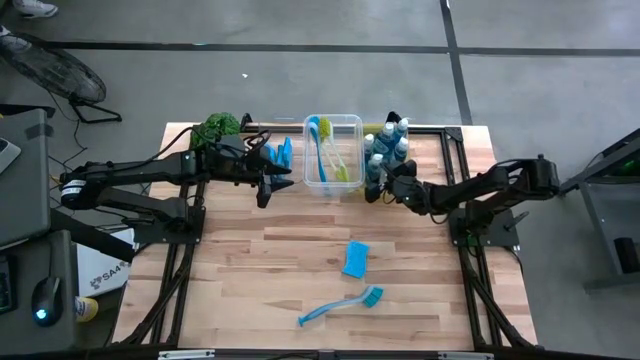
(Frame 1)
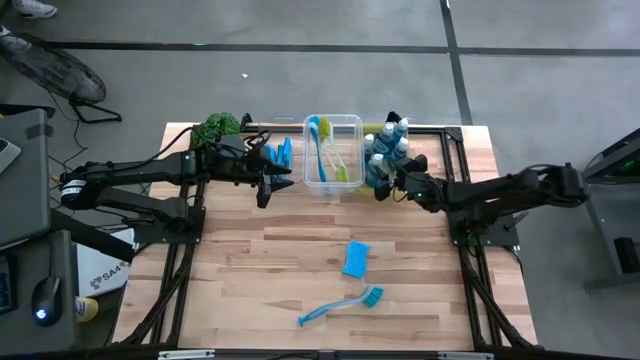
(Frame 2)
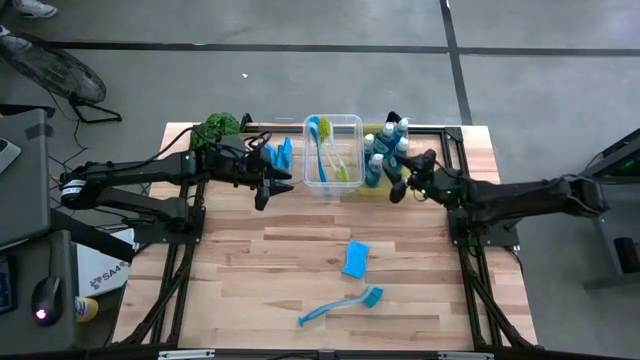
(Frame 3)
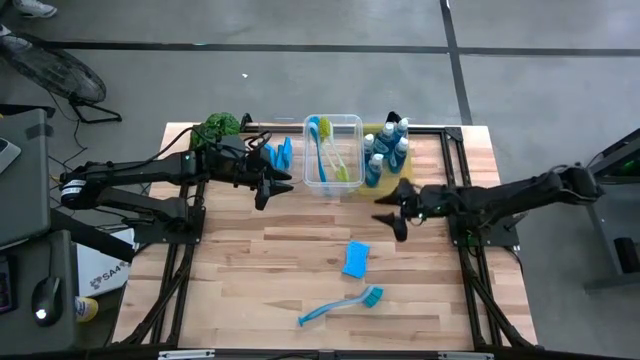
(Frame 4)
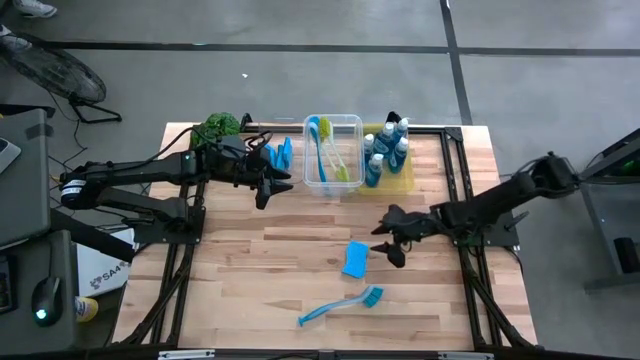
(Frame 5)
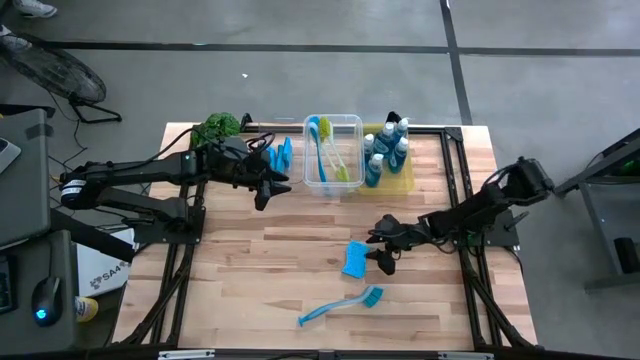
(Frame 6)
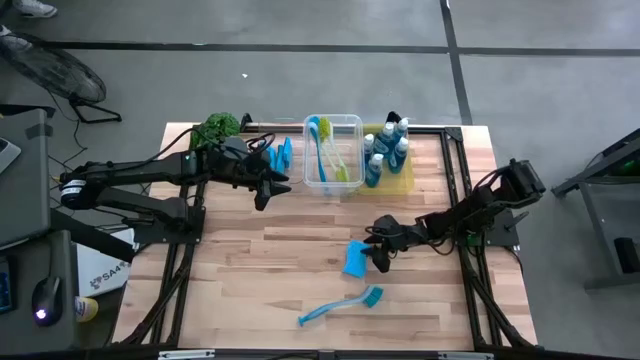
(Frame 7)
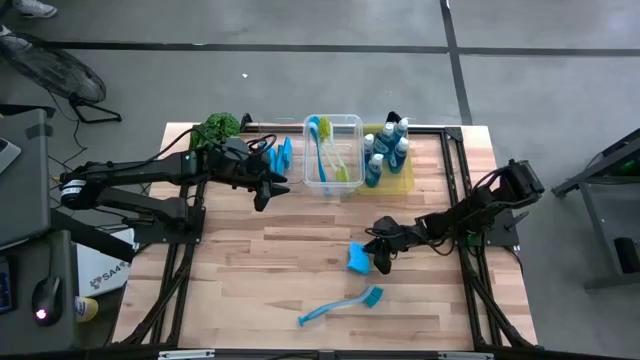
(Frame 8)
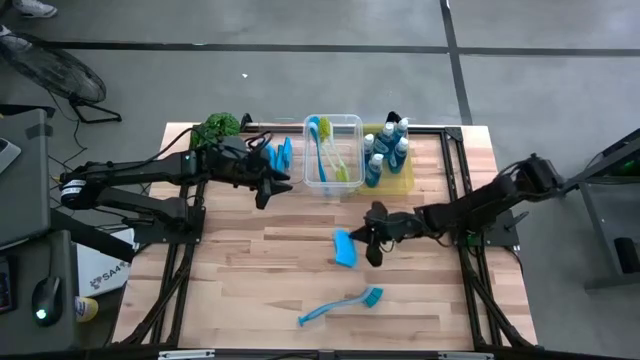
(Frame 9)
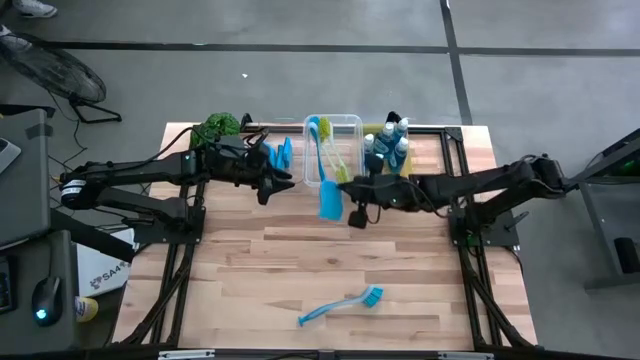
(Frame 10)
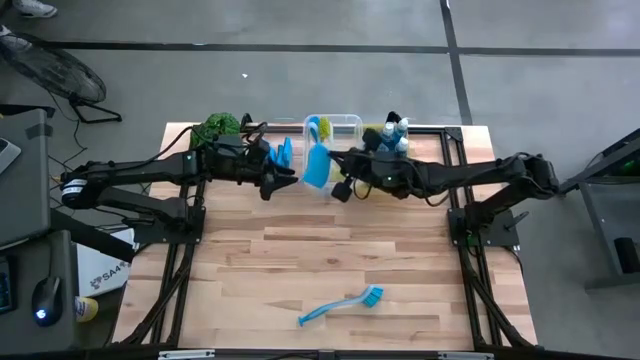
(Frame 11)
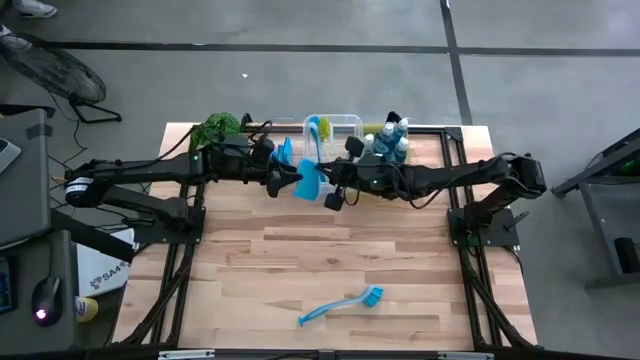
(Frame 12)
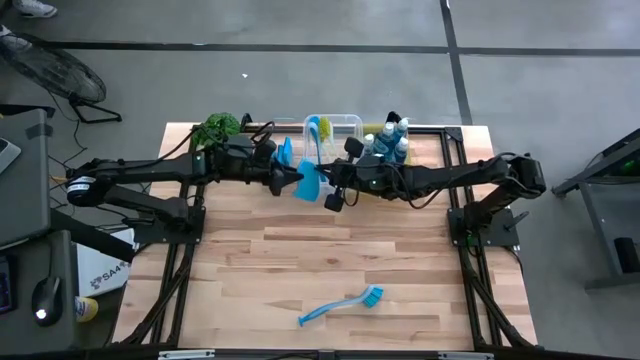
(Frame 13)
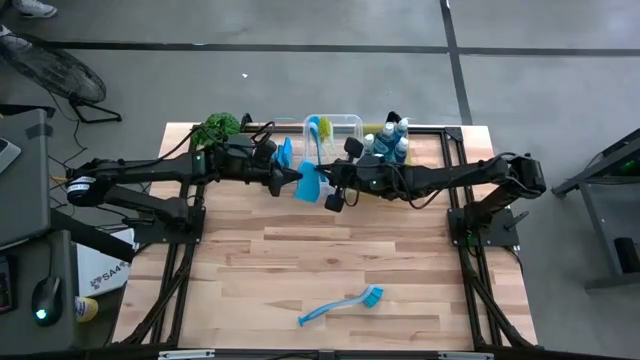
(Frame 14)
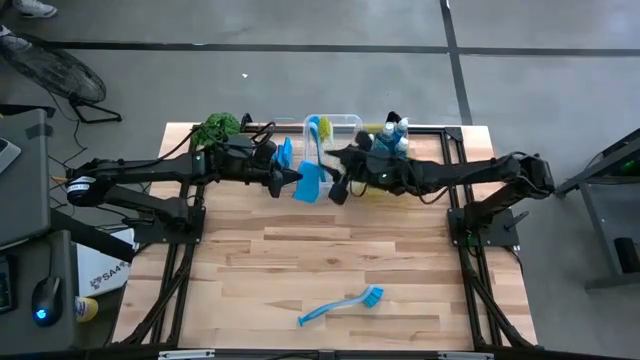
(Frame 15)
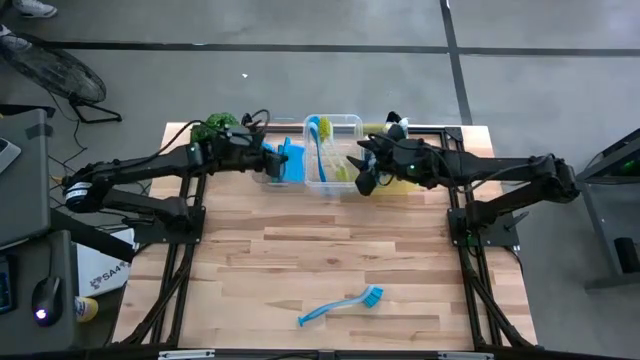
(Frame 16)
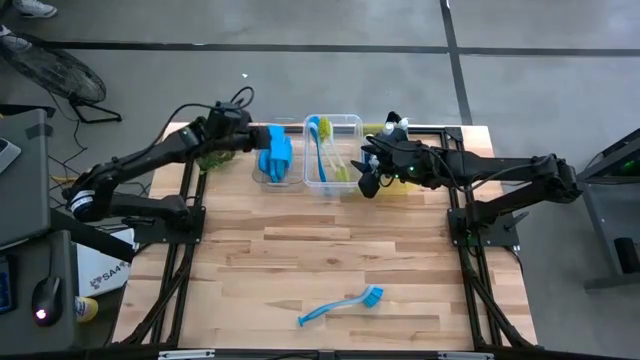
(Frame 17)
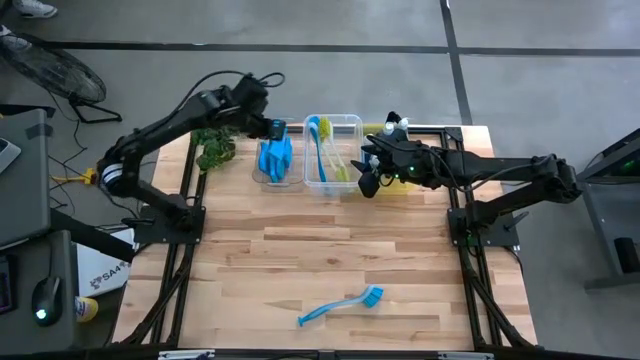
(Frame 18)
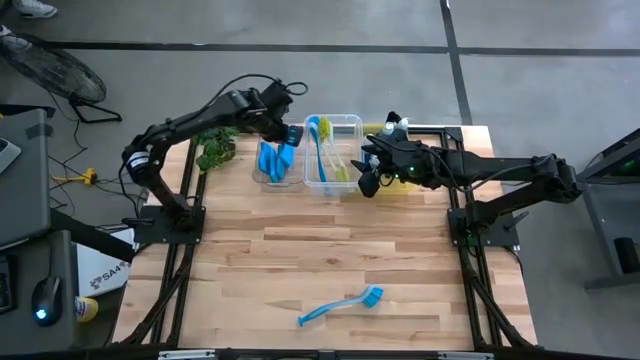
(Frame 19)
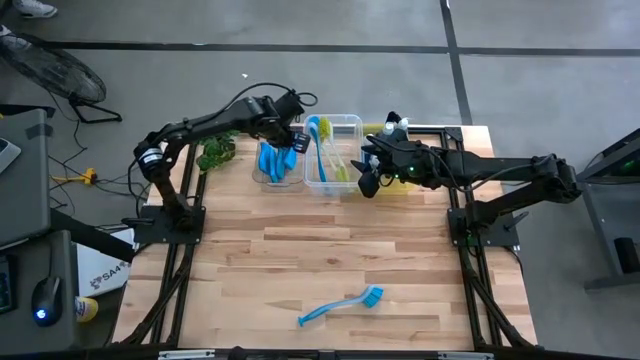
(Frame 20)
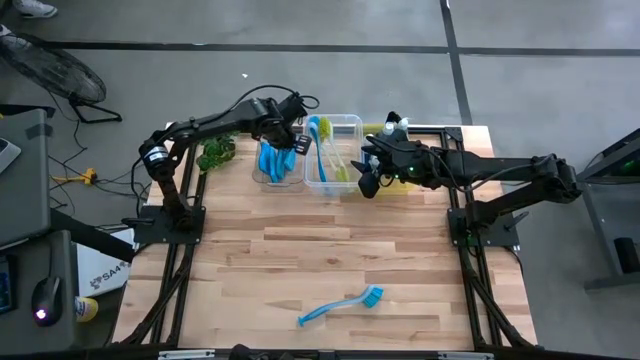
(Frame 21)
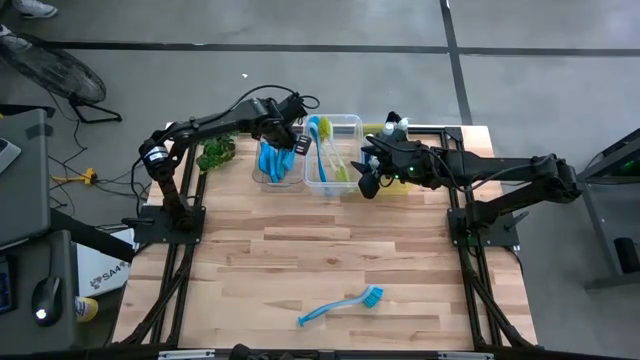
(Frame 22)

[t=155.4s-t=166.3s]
Task: Pick & Place Kitchen Sink Supplies
Put the sponge into the transparent bin

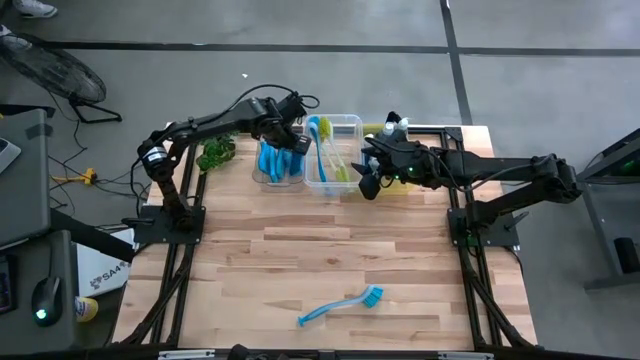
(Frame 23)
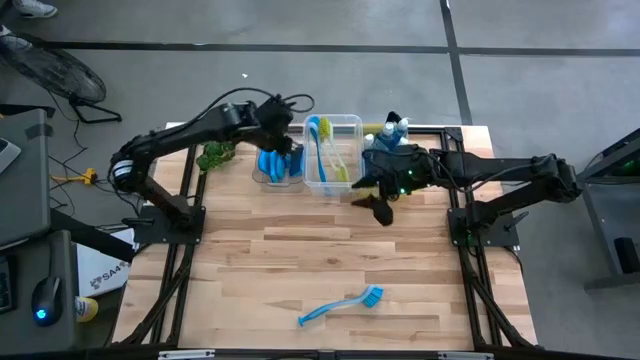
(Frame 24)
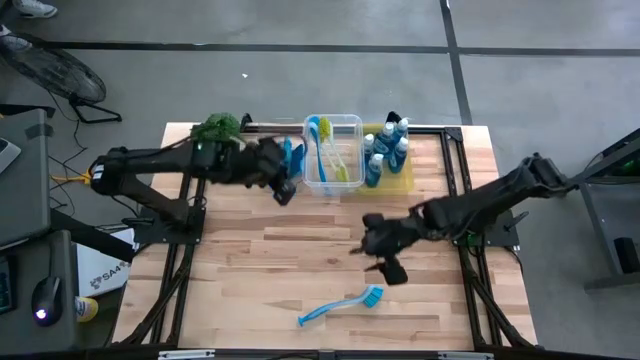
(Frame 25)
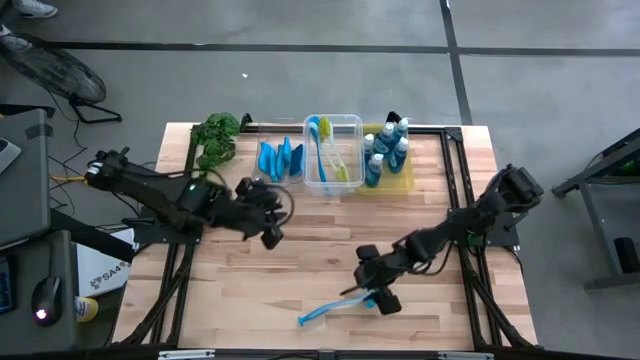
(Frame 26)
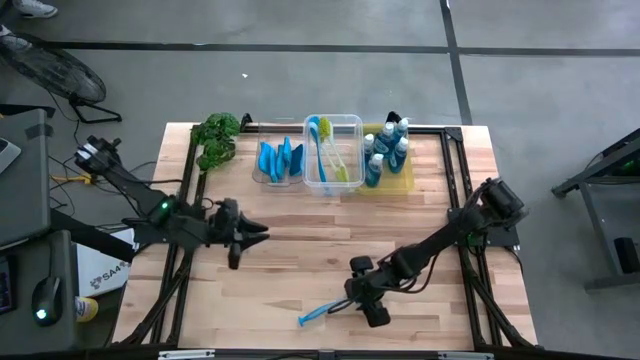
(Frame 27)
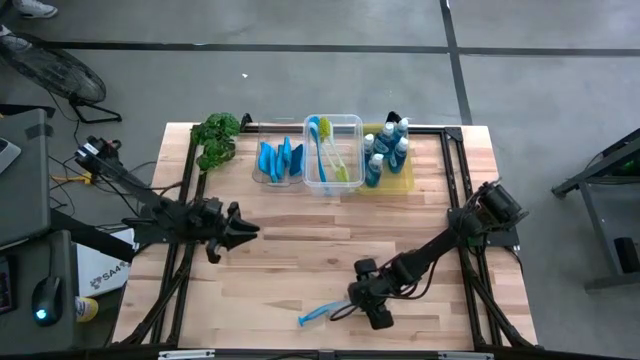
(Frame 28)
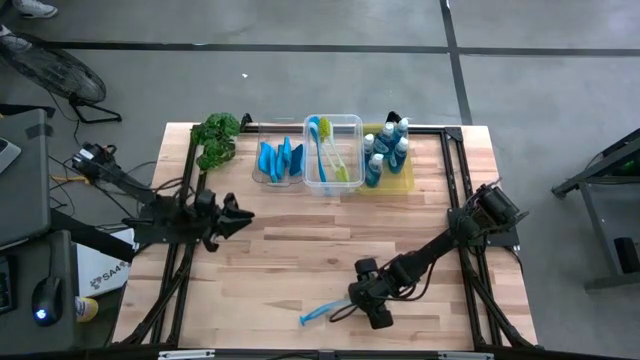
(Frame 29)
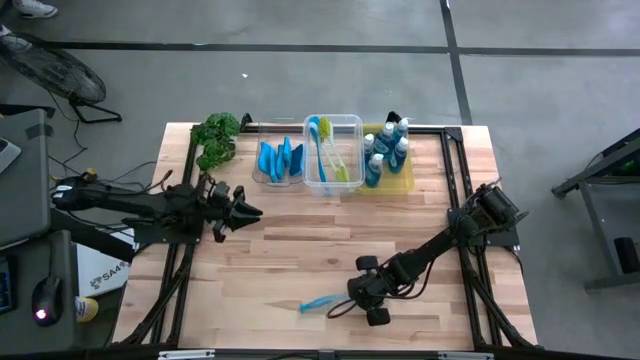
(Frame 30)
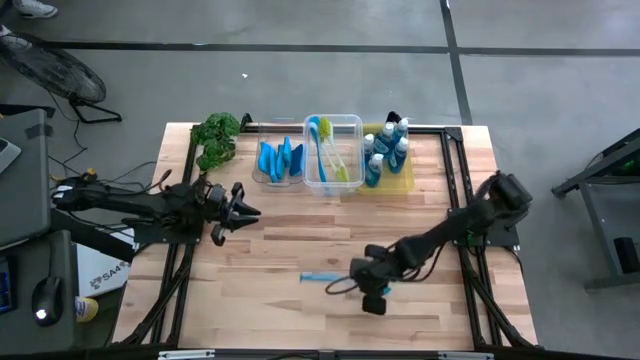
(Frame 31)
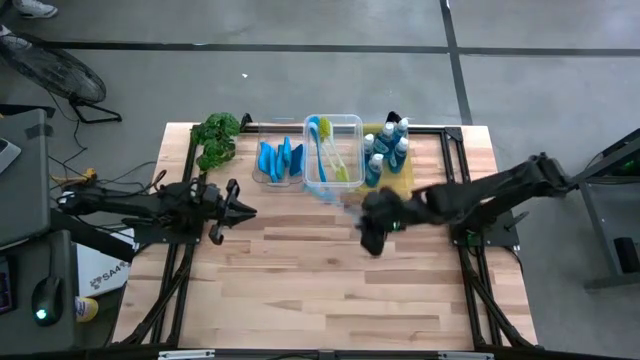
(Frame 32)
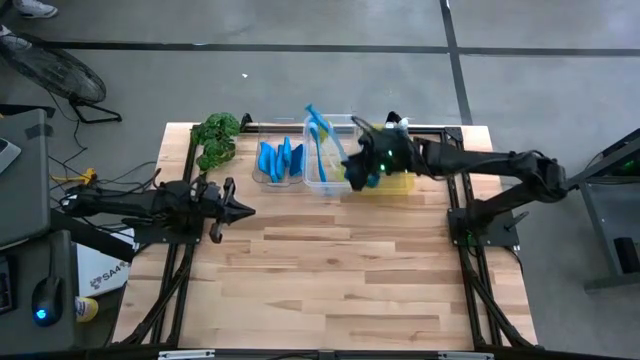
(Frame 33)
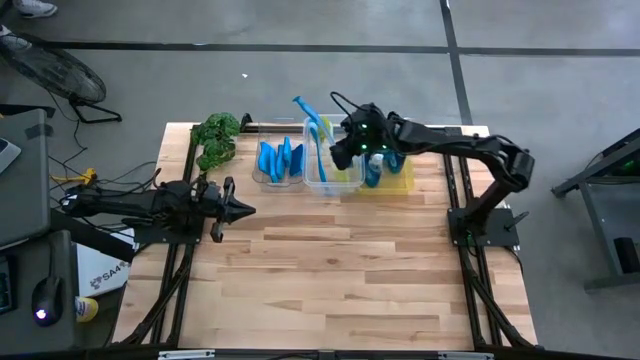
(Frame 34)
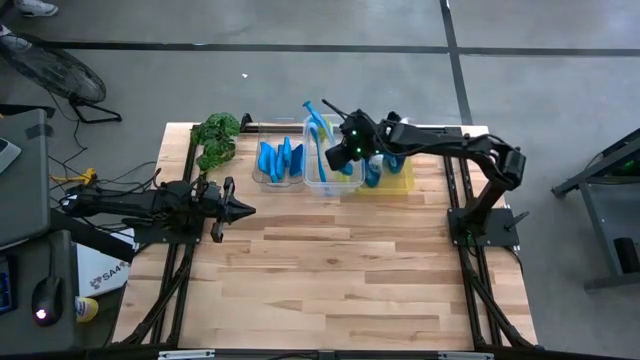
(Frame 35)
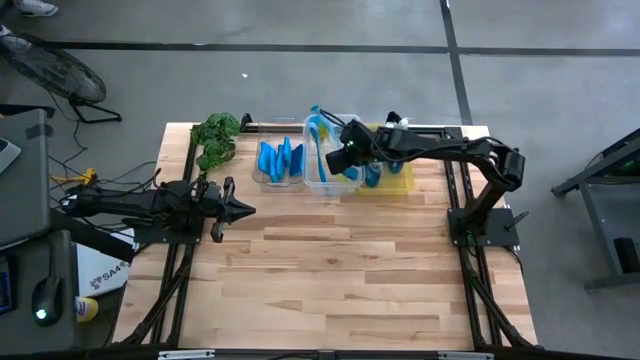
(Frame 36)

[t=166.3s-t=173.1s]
Put the dishwashing brush into the white bin

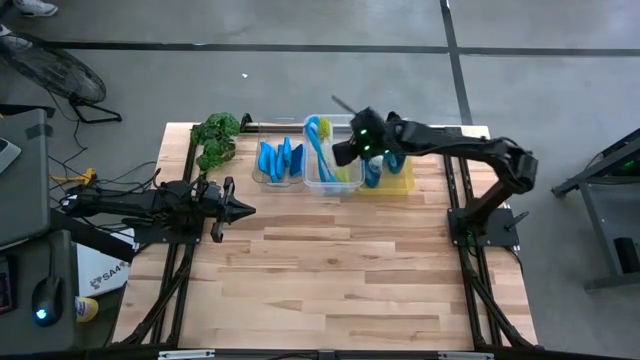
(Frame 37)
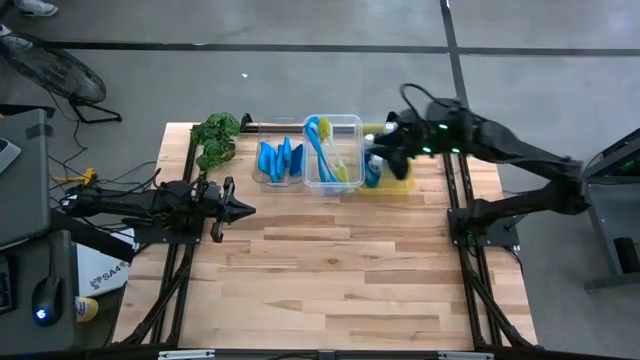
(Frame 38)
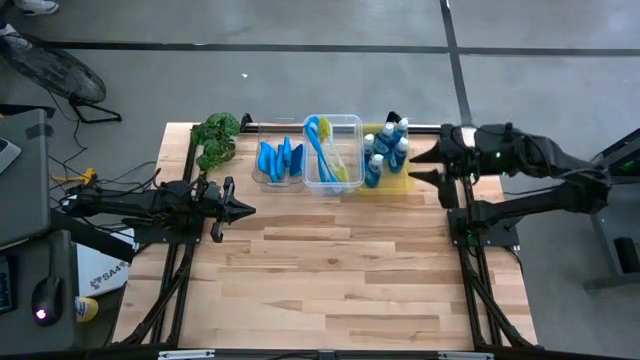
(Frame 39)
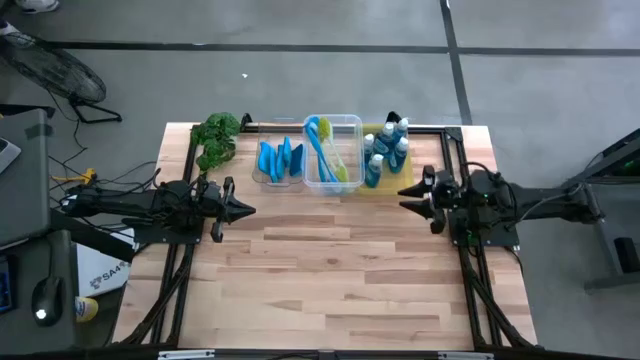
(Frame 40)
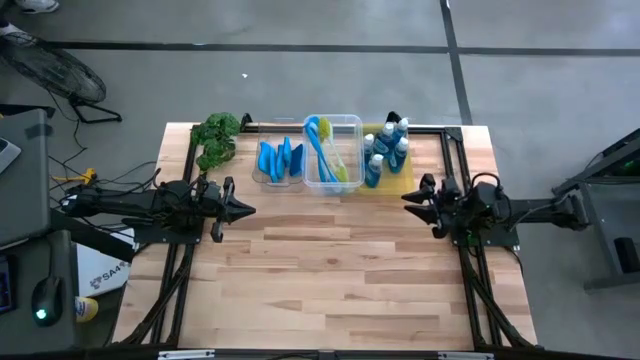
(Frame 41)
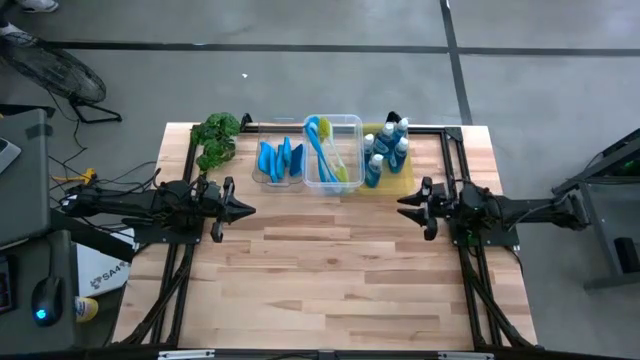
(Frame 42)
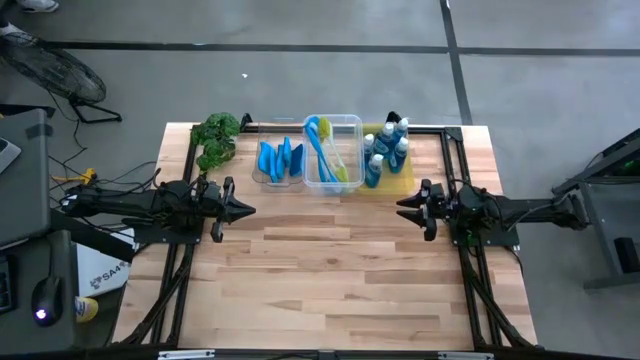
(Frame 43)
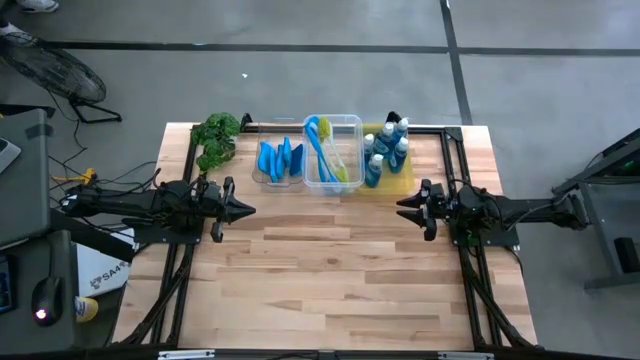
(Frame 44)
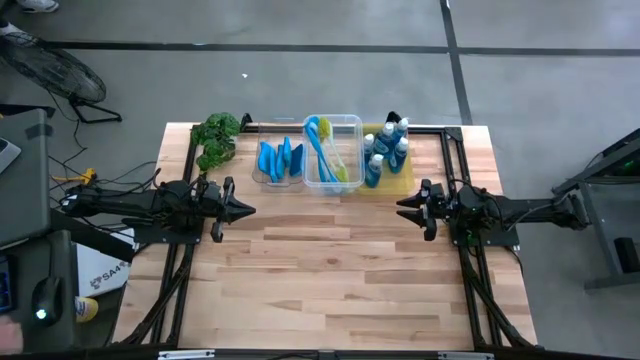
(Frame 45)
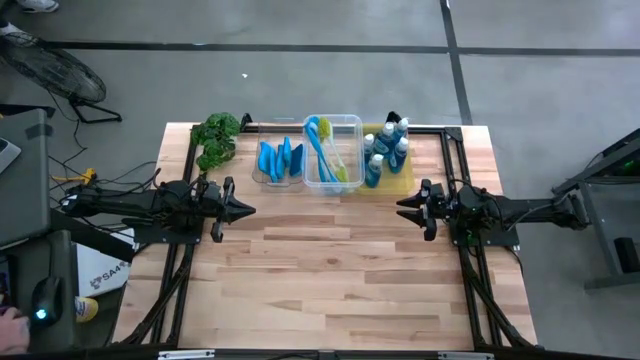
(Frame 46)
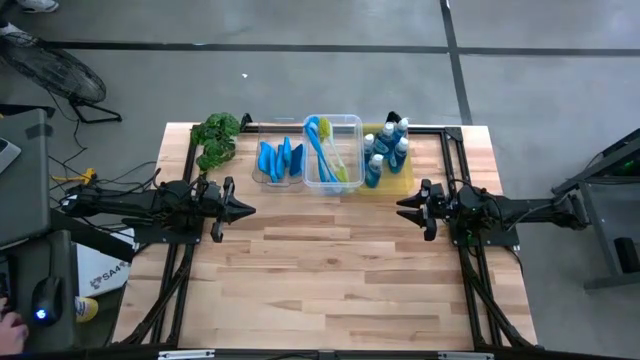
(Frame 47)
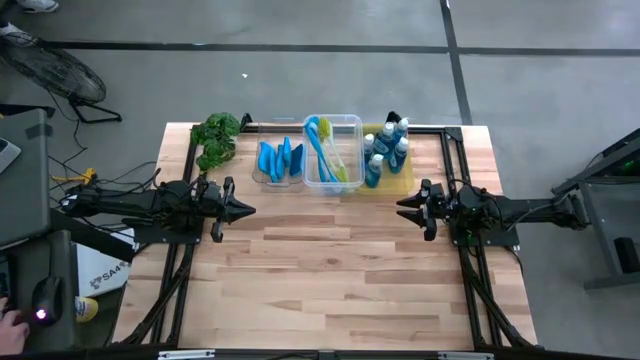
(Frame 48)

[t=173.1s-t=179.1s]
Return to Home Position
